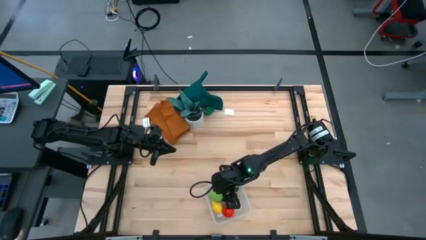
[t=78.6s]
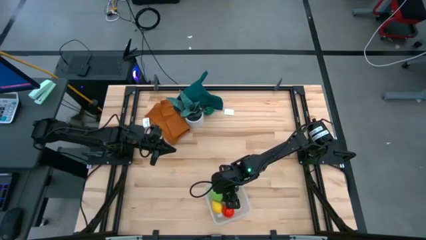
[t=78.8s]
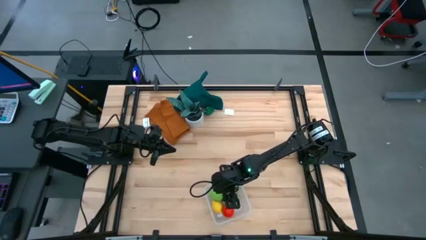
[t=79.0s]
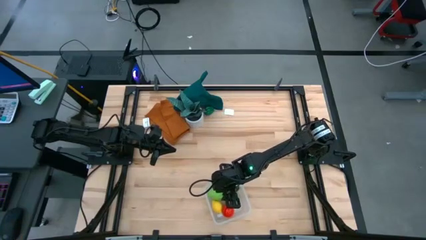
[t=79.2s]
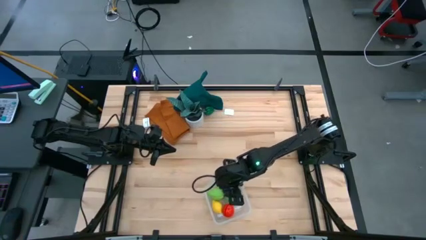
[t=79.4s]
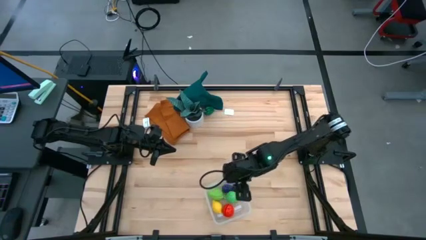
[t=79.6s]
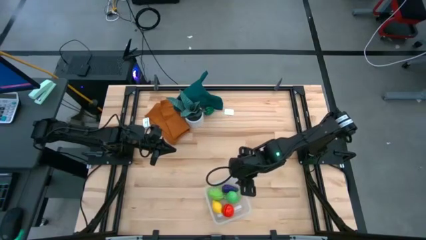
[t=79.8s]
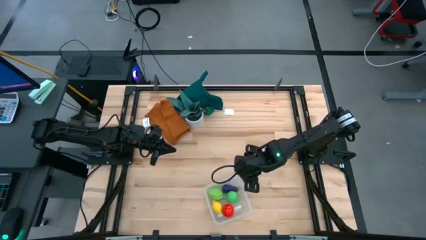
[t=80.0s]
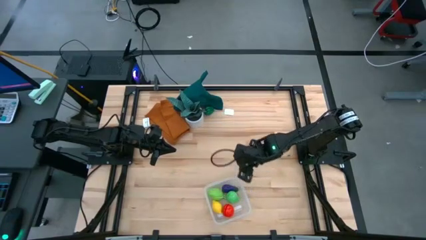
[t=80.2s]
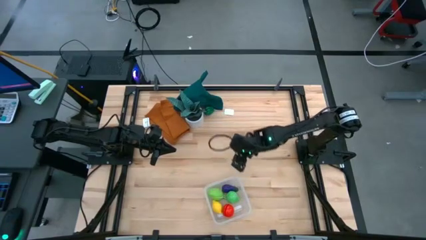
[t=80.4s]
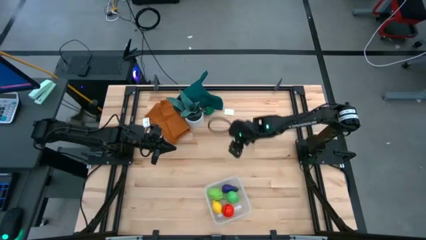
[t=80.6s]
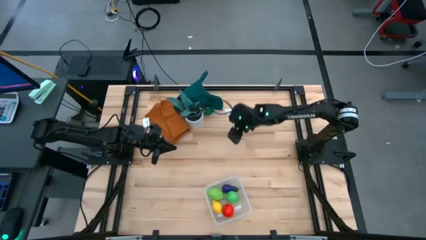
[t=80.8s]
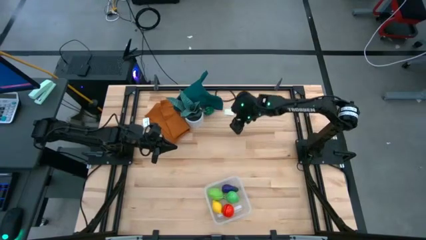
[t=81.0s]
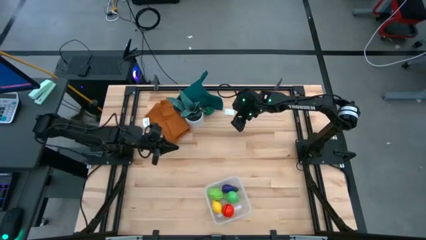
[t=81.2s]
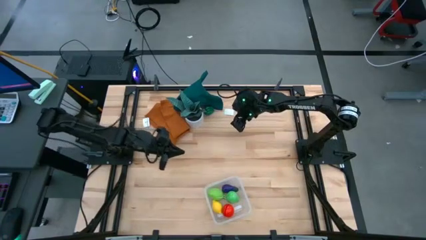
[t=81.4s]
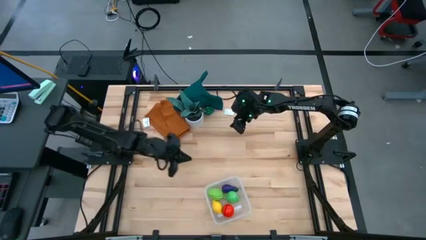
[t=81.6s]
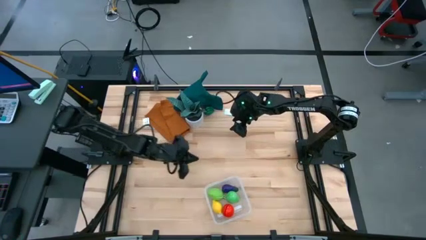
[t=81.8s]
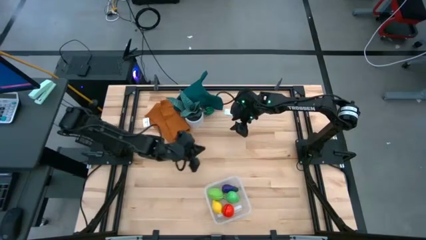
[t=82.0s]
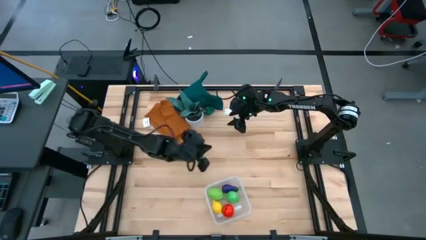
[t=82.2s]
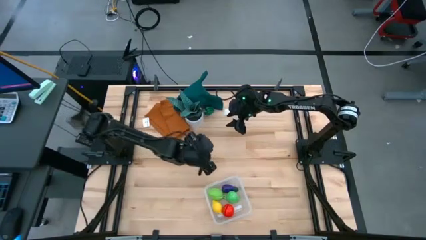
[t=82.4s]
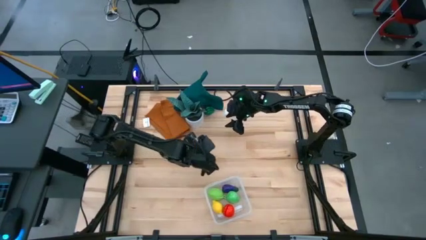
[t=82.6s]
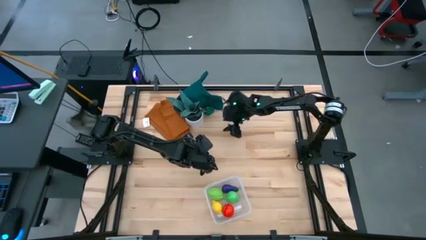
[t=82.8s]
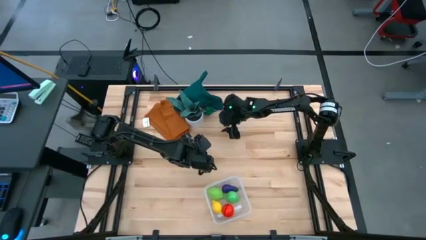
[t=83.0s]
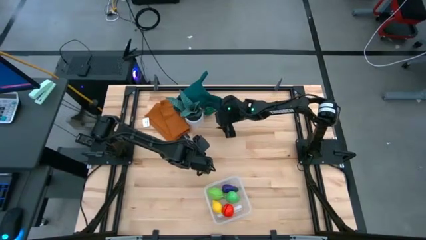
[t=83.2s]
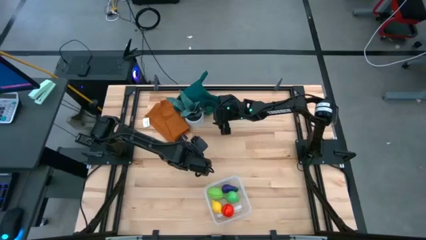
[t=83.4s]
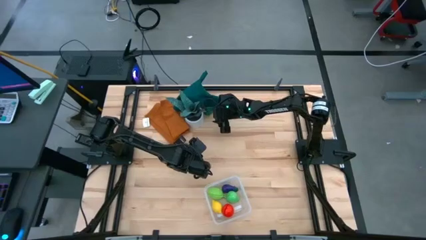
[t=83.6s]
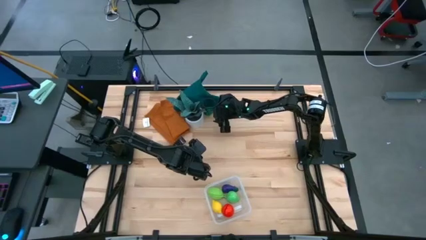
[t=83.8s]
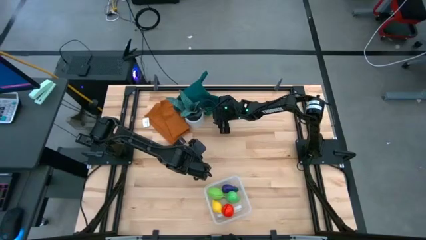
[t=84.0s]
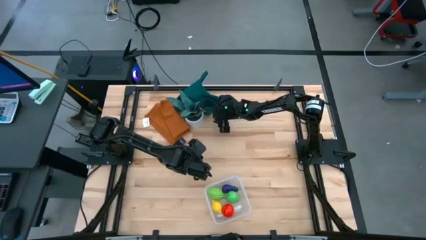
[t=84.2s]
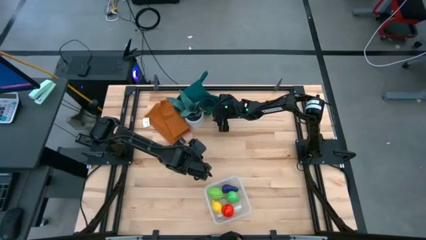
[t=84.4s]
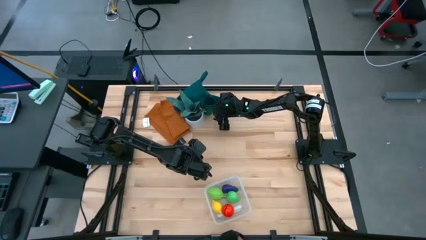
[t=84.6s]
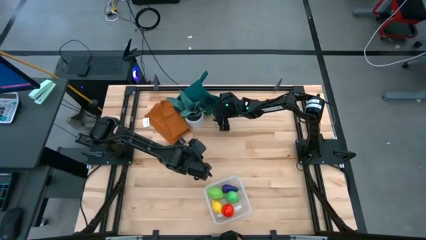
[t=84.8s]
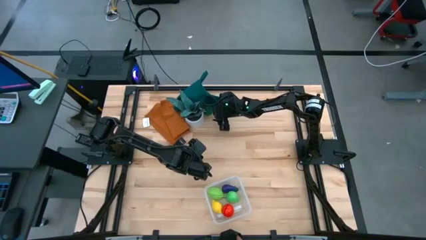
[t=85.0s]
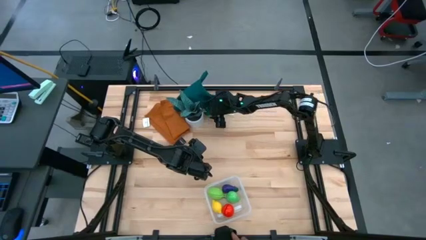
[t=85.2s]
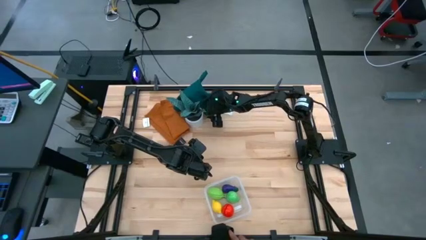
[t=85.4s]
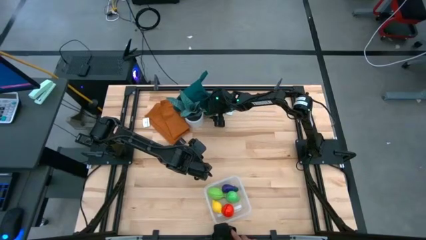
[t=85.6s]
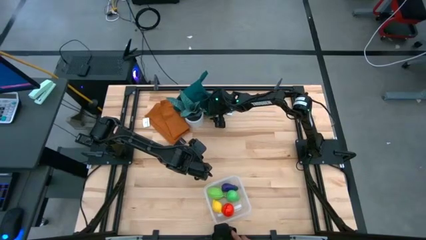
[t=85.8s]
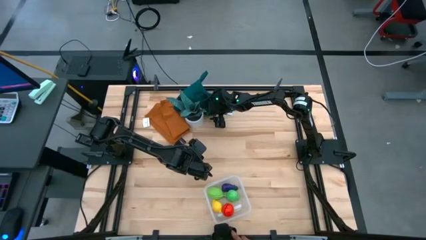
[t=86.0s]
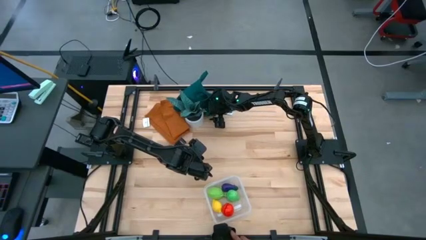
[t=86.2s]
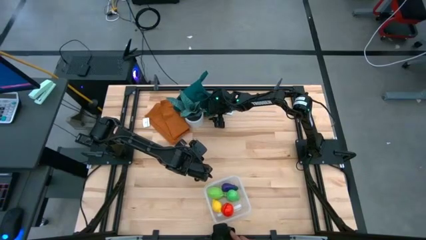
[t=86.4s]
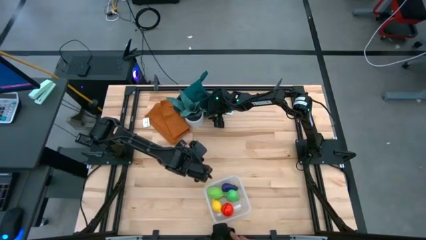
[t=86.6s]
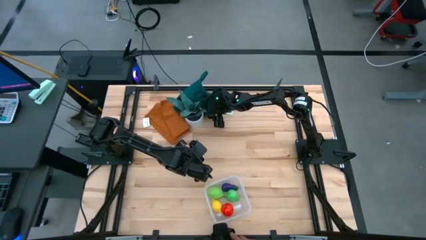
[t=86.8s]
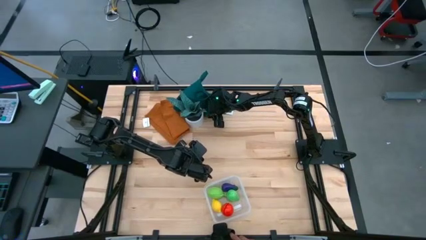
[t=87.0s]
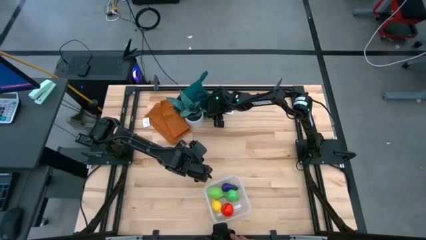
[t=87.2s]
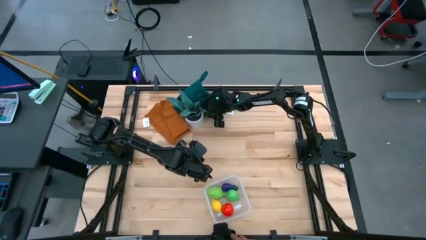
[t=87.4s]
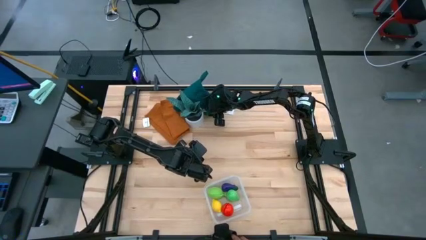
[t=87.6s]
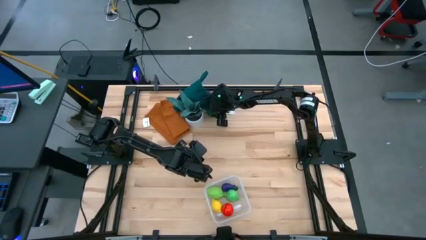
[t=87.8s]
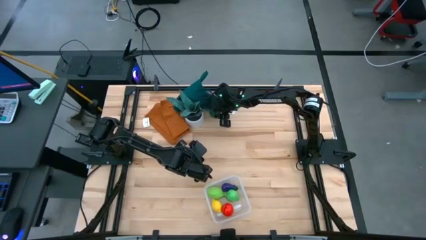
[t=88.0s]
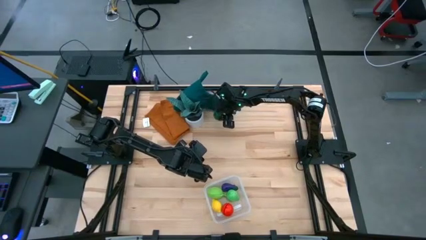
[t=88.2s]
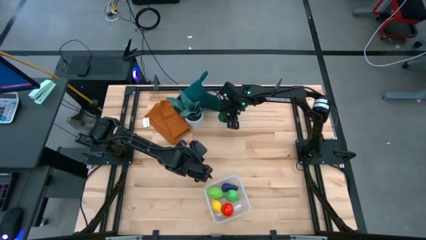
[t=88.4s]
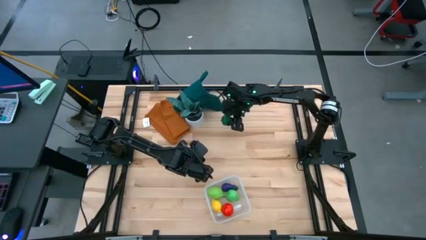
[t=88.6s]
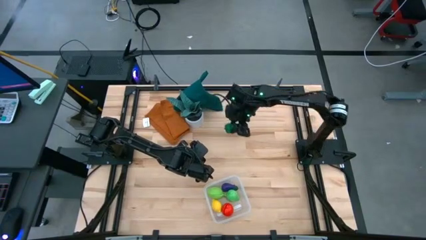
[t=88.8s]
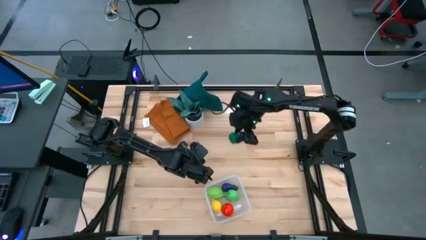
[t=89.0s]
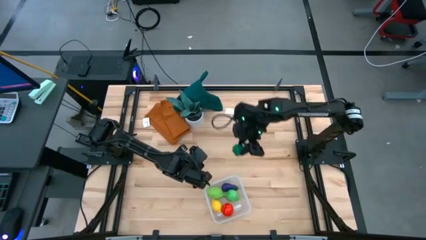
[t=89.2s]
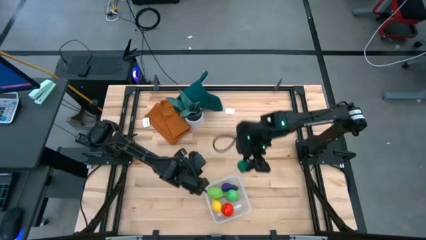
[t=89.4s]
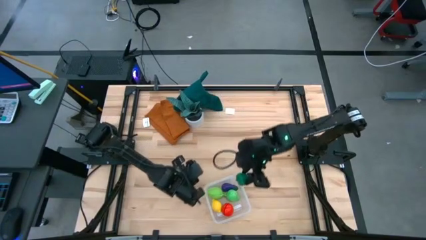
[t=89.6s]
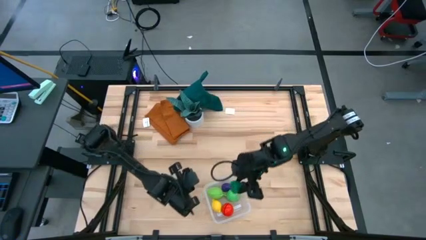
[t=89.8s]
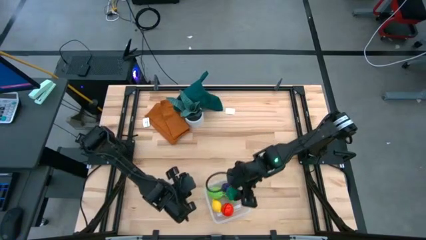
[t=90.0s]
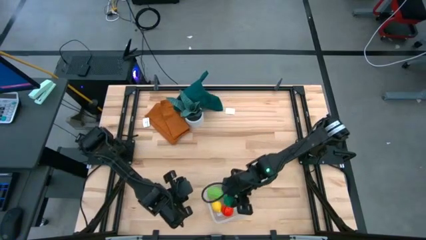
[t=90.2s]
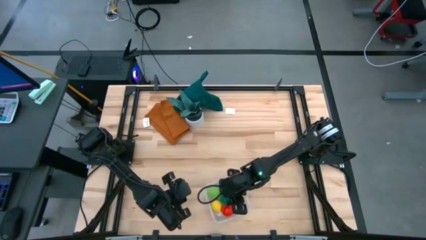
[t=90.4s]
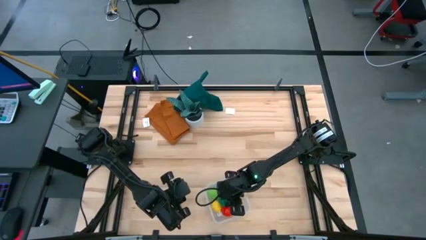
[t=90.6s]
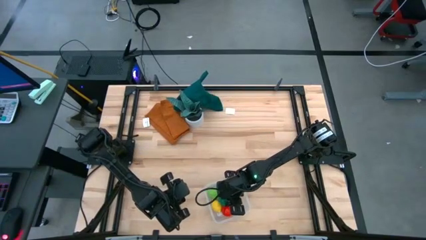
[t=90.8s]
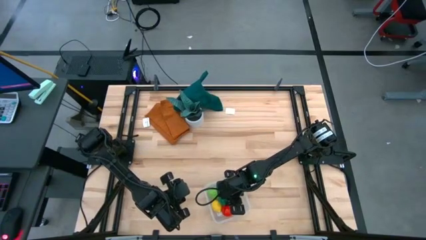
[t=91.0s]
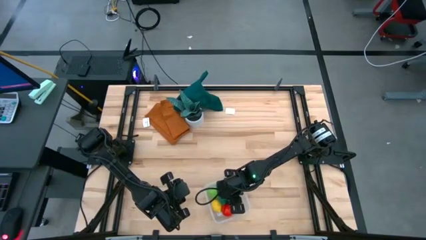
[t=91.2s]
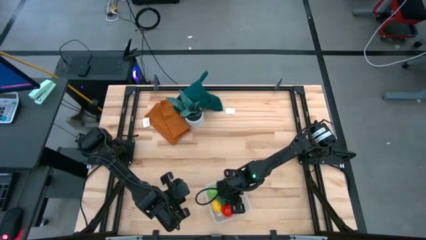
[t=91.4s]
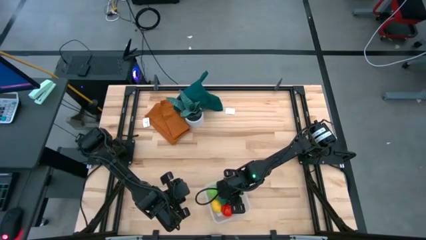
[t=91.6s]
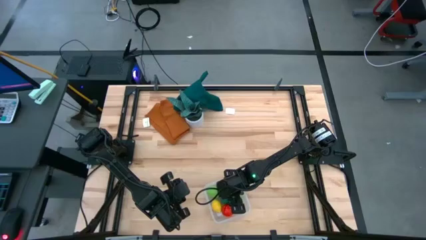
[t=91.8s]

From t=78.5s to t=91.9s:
Task: Pick and placing Produce into tupperware
Put the bell pepper into the transparent bin
